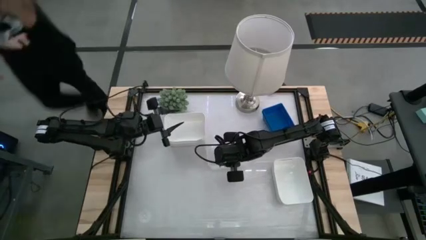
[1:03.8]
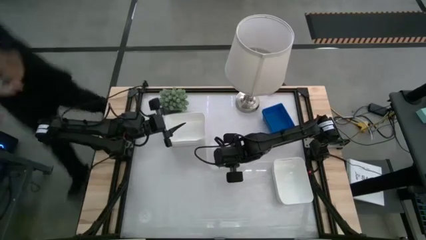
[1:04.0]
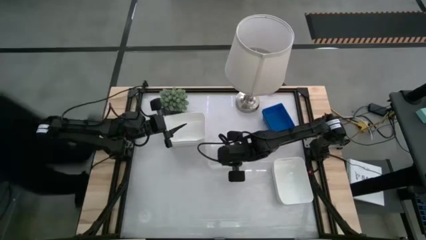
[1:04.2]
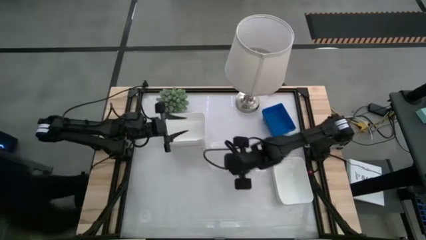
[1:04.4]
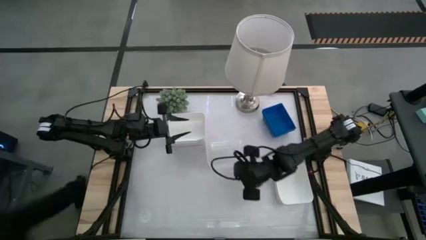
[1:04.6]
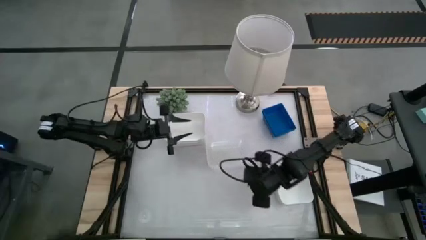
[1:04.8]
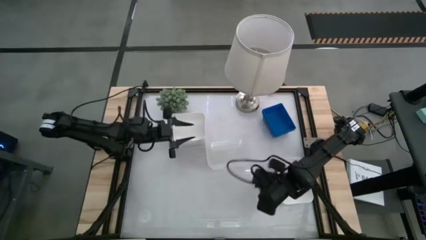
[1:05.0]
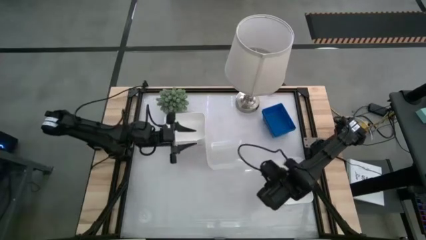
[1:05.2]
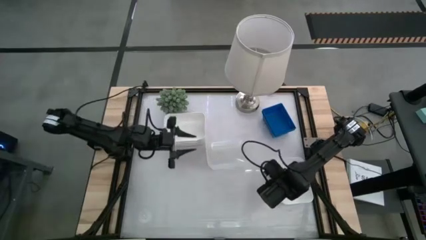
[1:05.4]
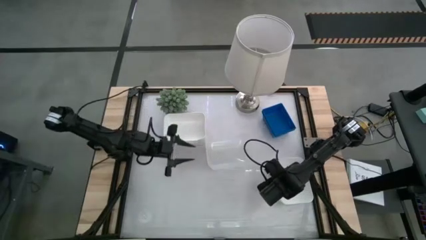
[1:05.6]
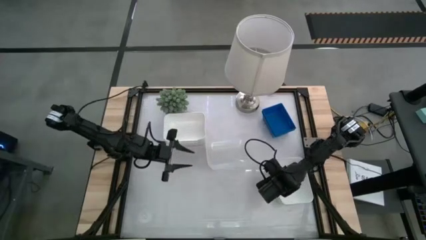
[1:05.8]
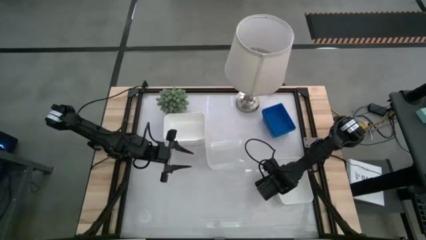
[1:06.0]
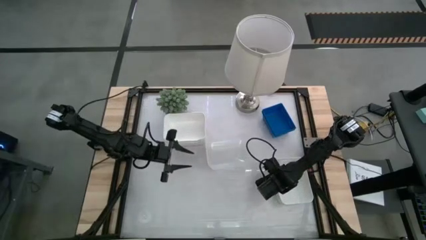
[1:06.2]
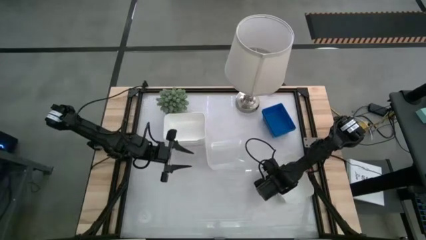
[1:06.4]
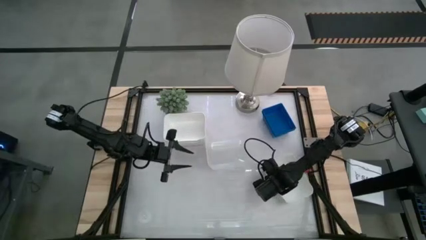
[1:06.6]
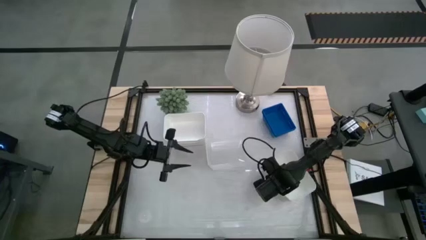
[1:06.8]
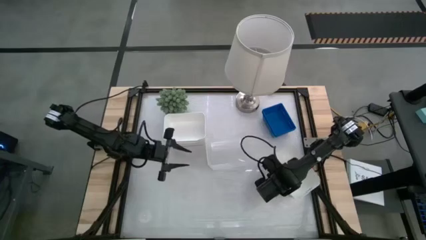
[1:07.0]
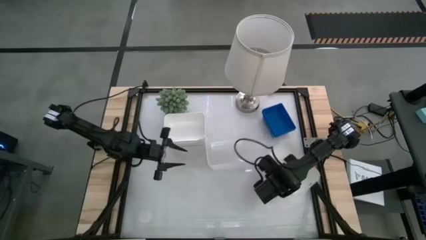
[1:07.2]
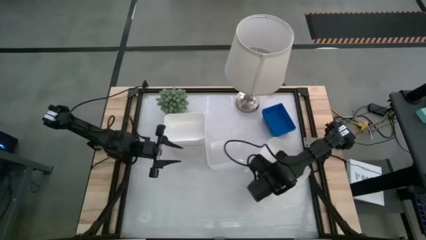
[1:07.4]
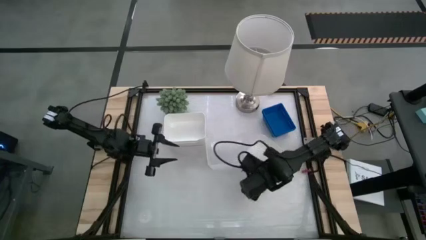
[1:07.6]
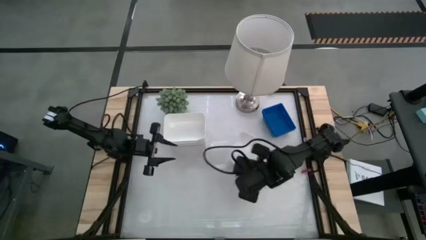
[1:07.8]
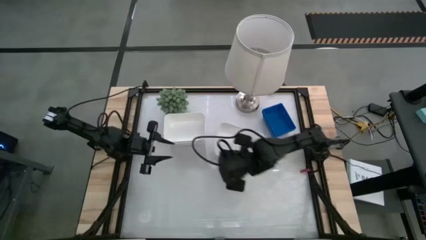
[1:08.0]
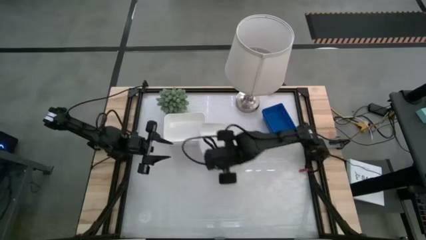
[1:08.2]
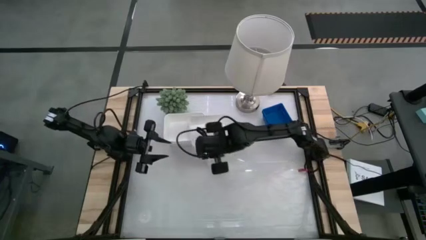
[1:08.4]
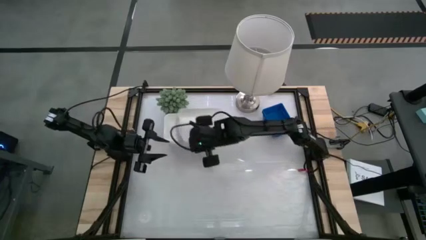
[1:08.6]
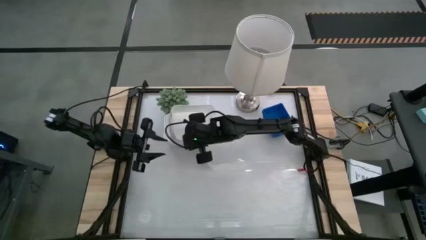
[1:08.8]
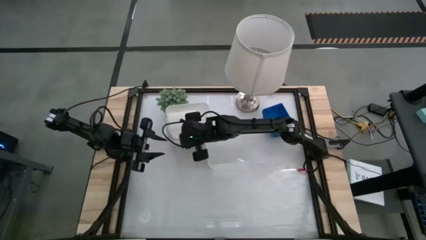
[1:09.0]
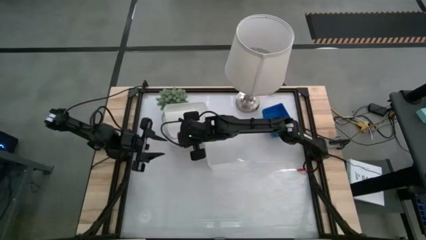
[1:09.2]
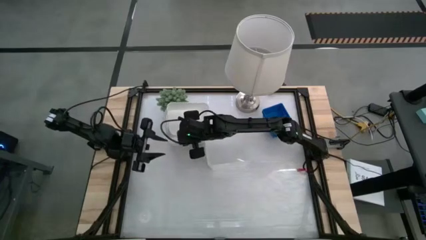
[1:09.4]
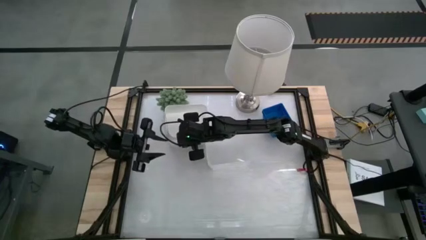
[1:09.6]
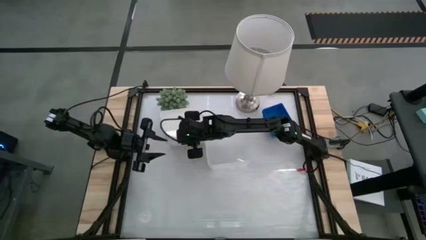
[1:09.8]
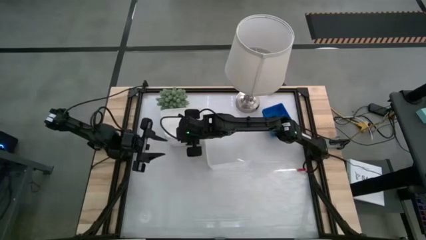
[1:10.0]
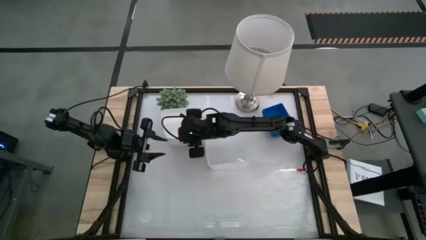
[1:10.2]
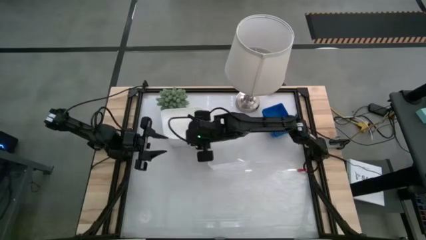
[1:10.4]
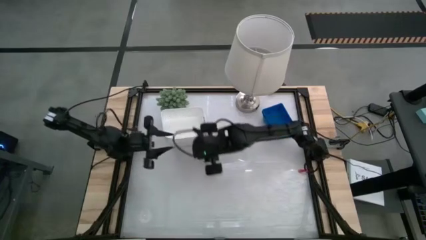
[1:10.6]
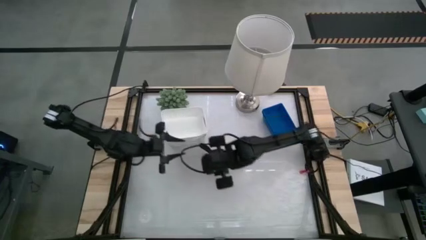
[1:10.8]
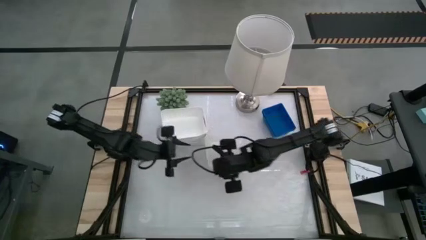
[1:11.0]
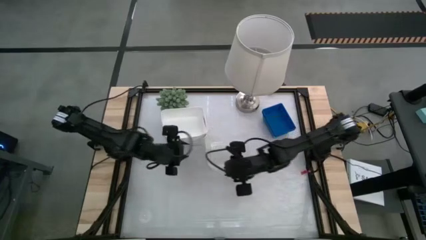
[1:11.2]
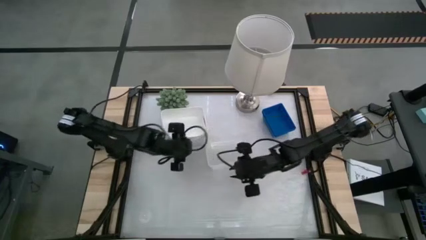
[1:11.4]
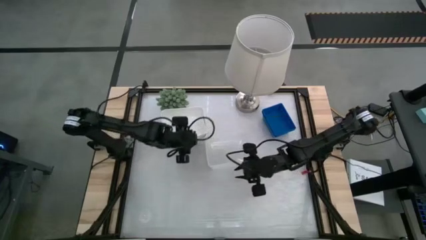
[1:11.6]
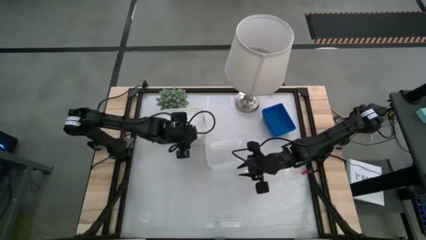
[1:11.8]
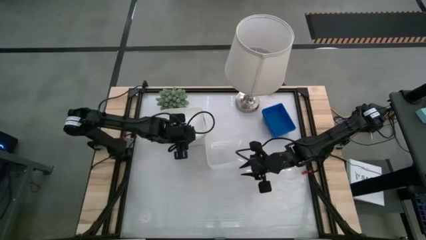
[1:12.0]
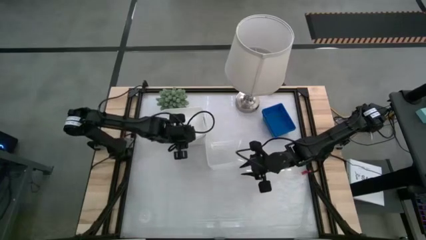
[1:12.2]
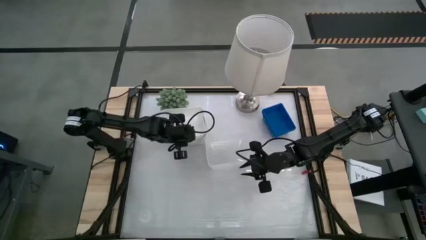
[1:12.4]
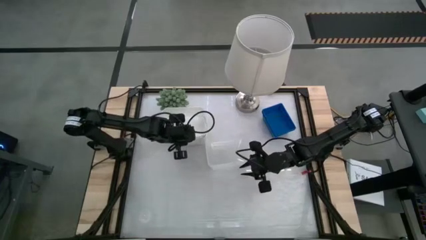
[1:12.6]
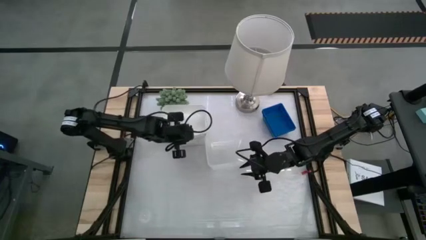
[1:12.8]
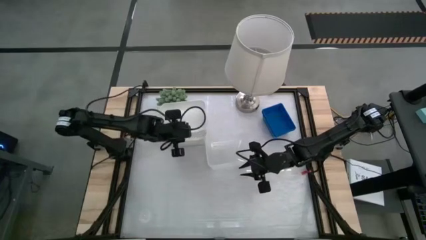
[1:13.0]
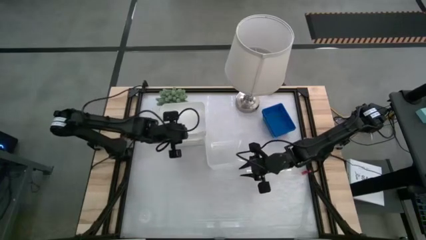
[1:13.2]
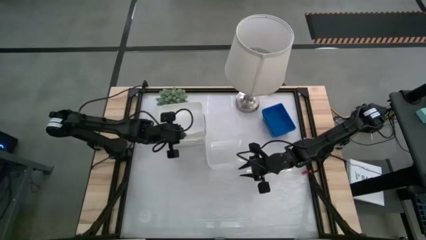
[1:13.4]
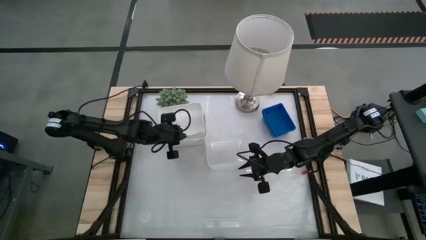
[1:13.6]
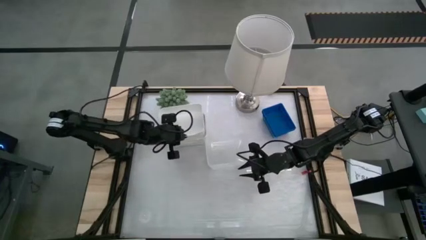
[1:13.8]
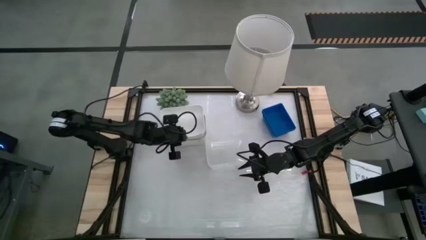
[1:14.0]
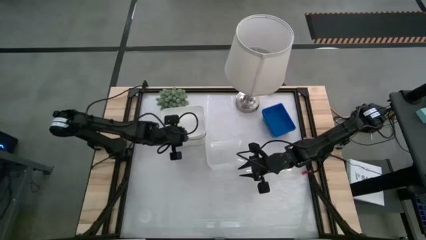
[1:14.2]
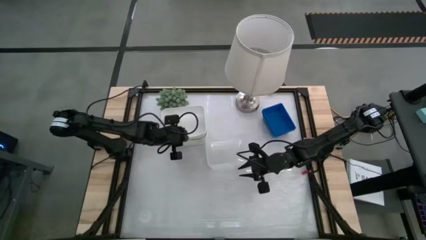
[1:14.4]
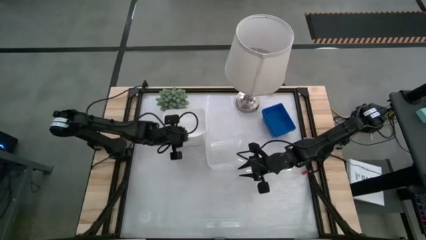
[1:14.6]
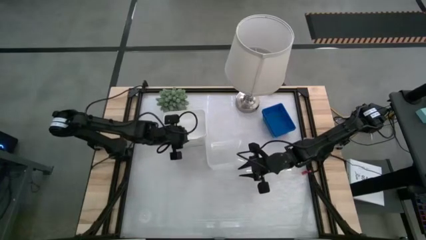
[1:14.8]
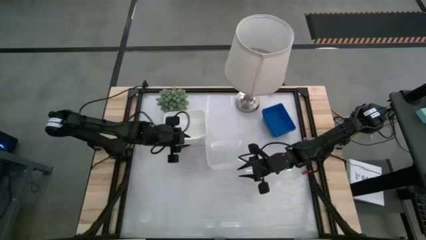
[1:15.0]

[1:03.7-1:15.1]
Stack the right white bin on top of the white bin

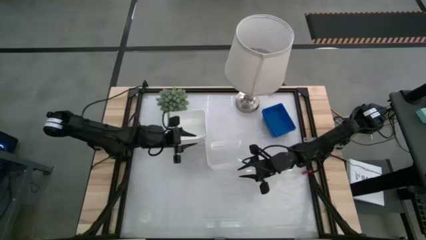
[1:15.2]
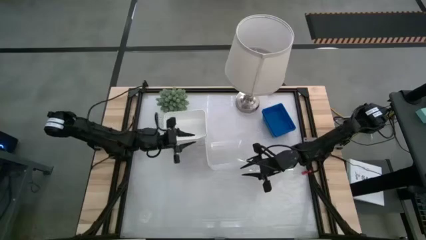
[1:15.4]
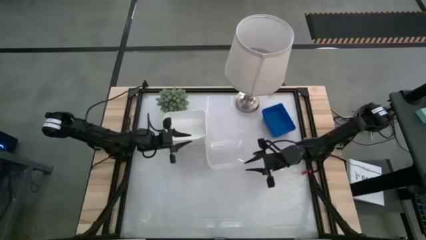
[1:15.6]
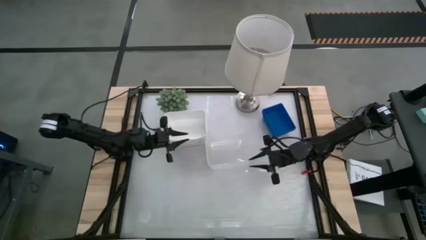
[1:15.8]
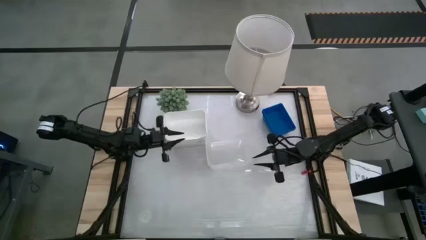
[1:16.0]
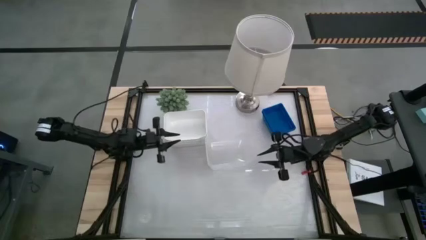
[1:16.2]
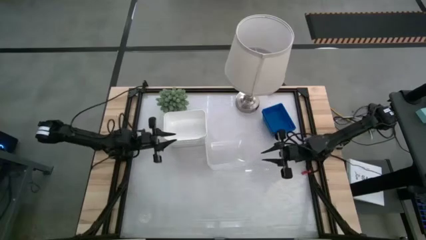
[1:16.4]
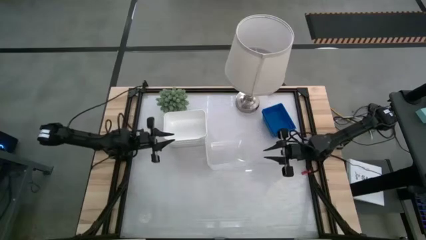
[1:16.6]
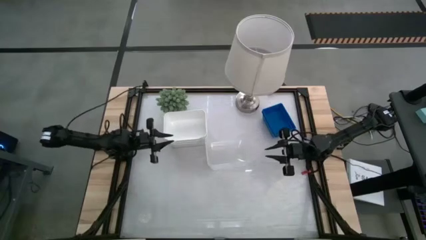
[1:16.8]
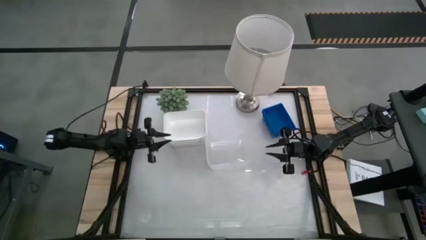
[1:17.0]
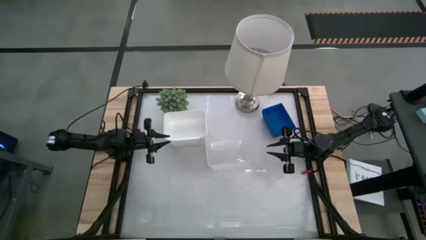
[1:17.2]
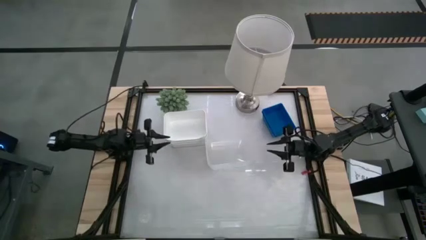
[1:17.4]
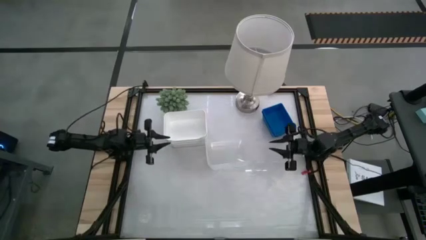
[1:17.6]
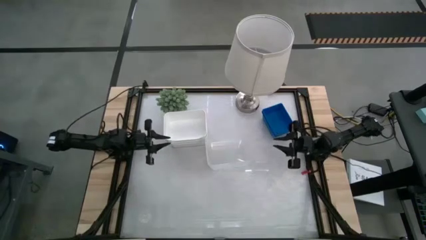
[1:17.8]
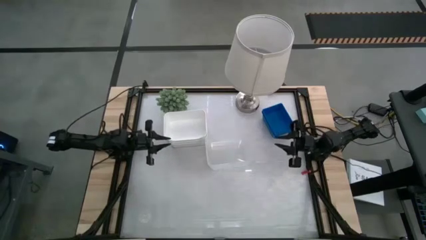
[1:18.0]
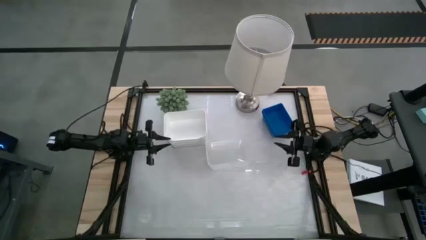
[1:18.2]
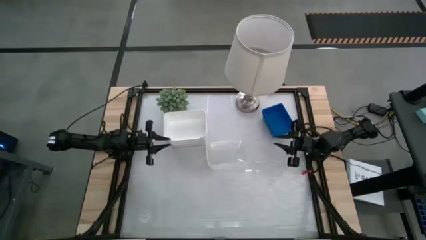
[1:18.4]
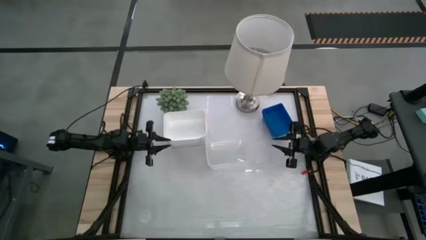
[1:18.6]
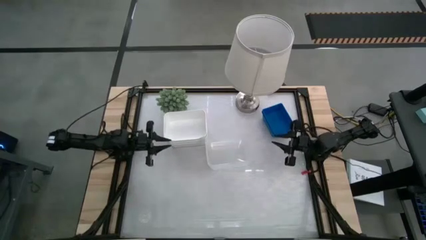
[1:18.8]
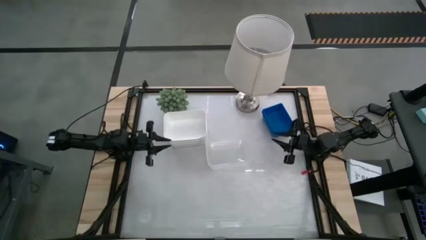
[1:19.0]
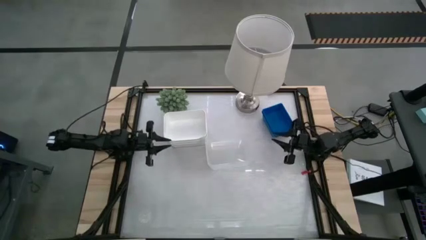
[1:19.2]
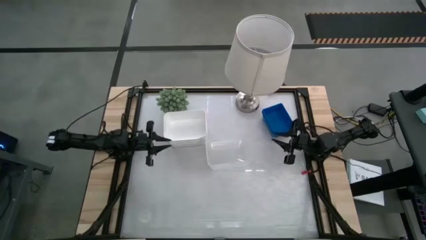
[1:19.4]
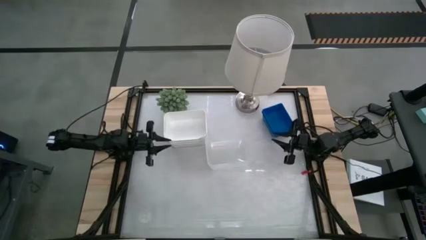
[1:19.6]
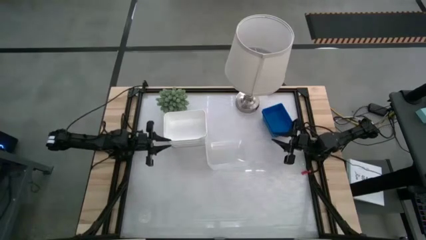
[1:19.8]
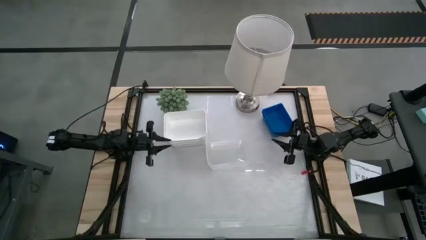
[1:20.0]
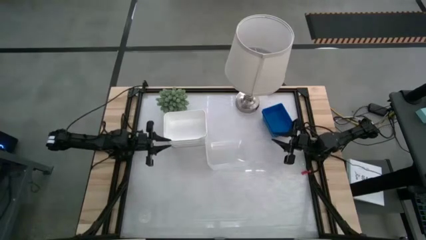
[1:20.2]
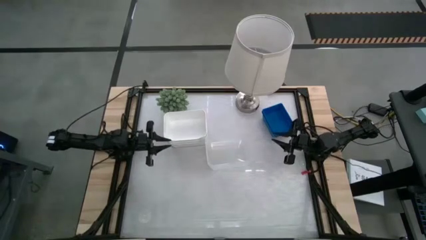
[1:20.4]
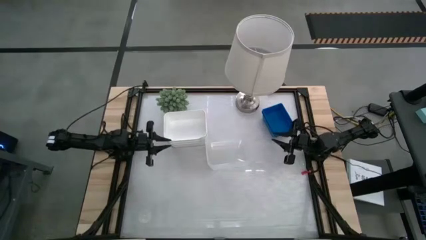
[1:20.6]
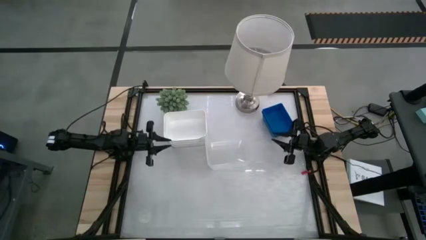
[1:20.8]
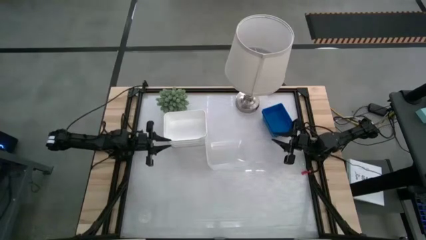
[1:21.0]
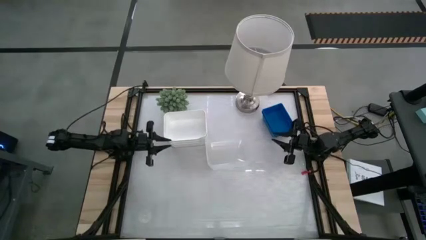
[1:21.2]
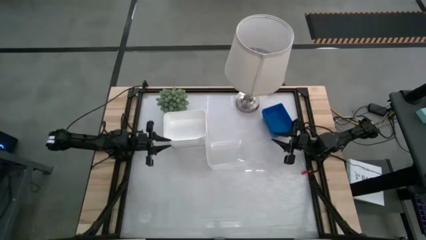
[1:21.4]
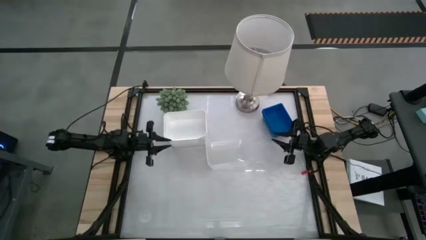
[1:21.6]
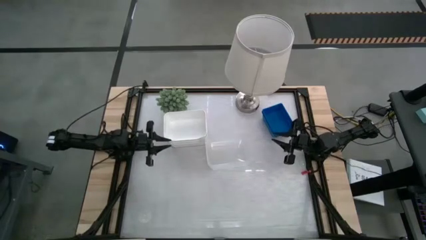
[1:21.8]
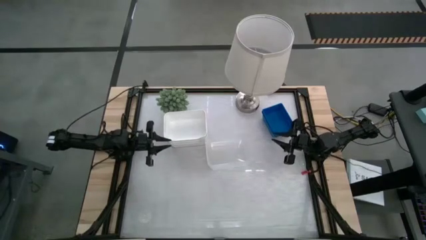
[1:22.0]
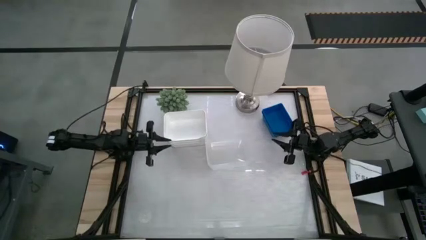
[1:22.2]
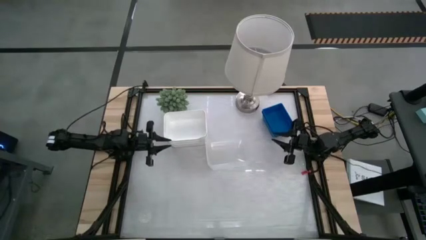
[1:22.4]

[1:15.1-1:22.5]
Return to Home Position
